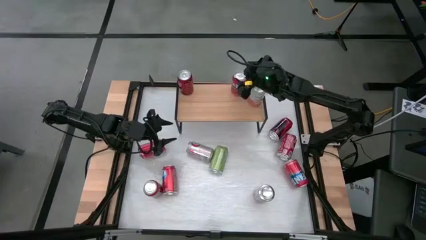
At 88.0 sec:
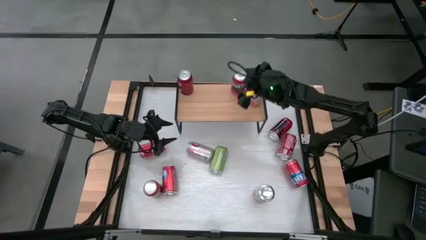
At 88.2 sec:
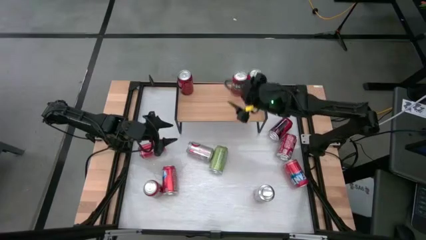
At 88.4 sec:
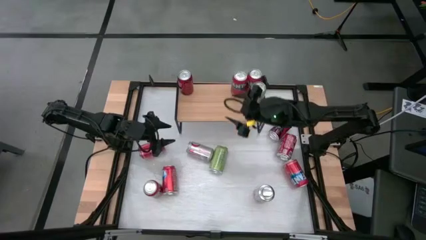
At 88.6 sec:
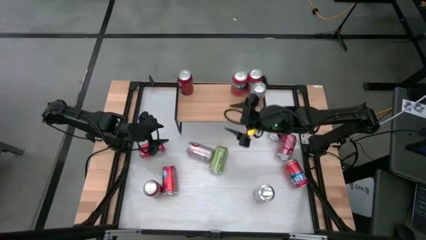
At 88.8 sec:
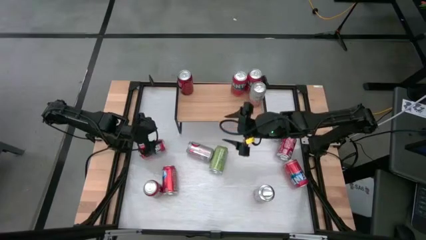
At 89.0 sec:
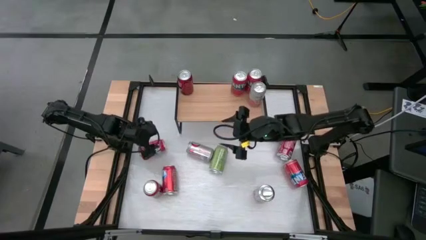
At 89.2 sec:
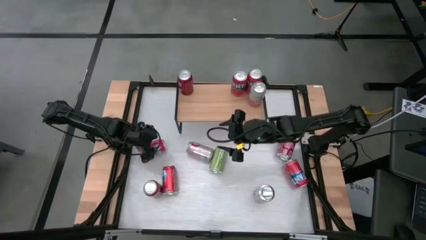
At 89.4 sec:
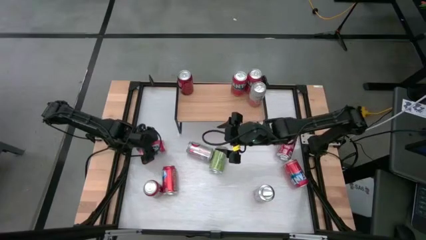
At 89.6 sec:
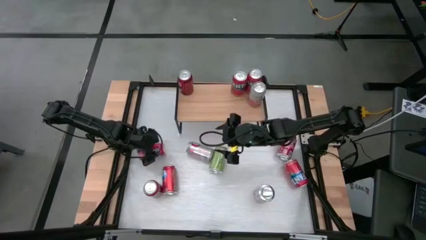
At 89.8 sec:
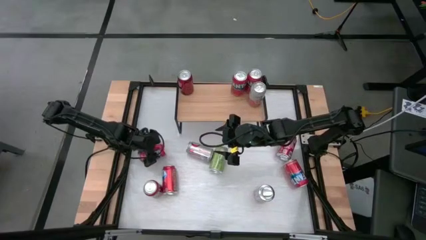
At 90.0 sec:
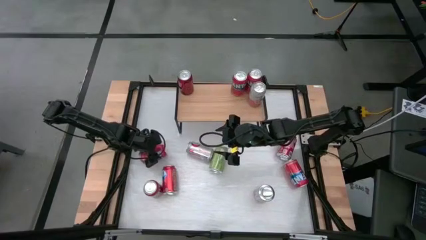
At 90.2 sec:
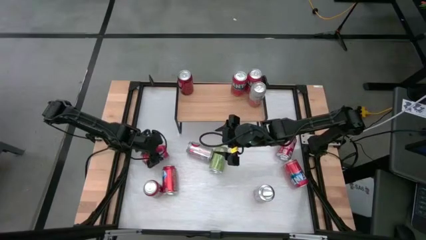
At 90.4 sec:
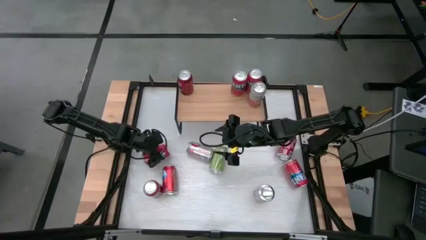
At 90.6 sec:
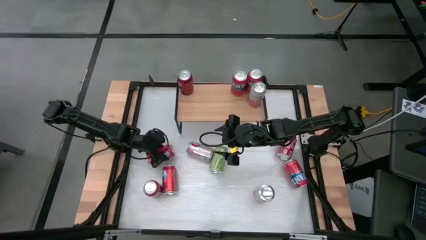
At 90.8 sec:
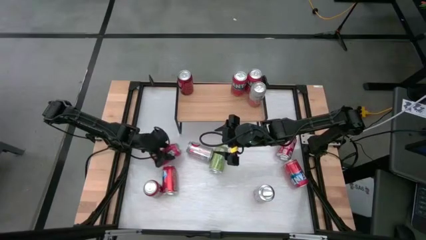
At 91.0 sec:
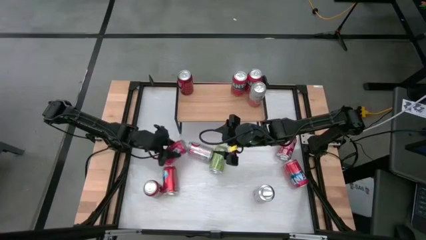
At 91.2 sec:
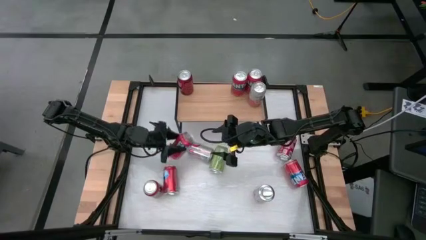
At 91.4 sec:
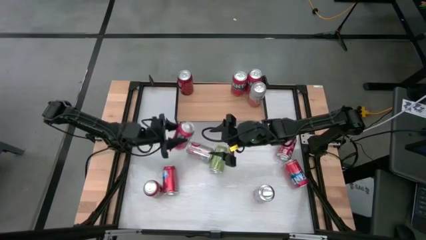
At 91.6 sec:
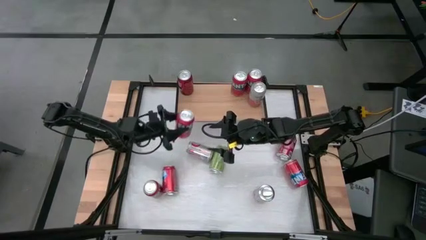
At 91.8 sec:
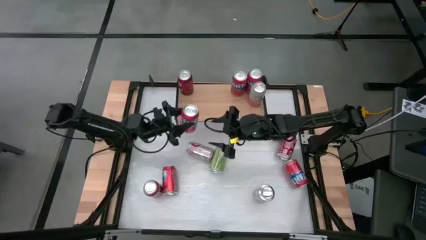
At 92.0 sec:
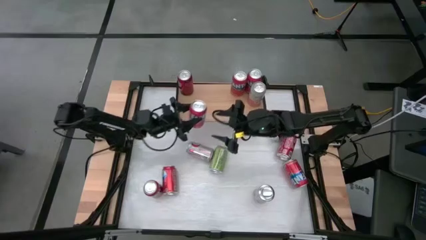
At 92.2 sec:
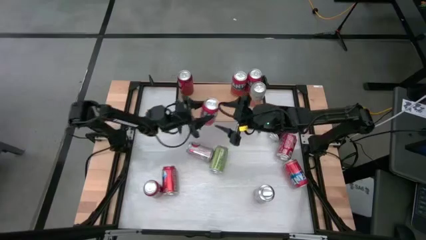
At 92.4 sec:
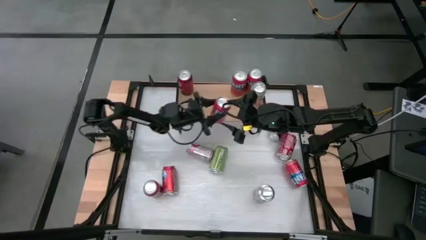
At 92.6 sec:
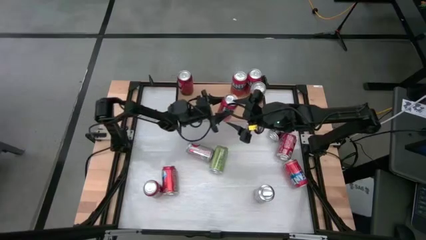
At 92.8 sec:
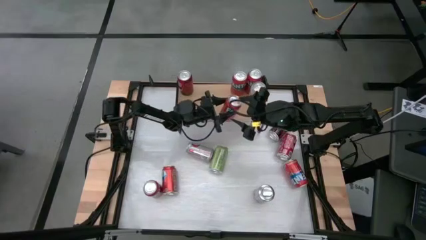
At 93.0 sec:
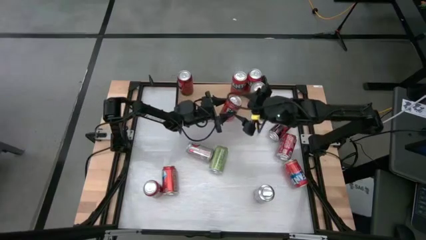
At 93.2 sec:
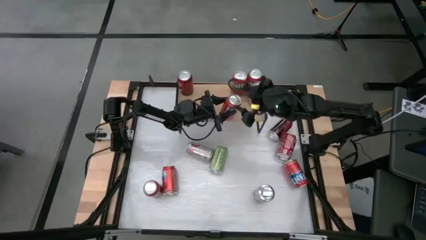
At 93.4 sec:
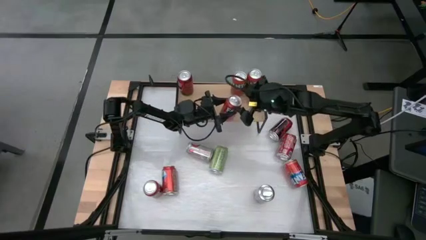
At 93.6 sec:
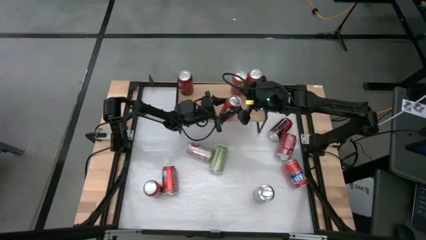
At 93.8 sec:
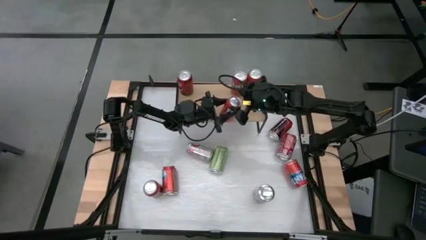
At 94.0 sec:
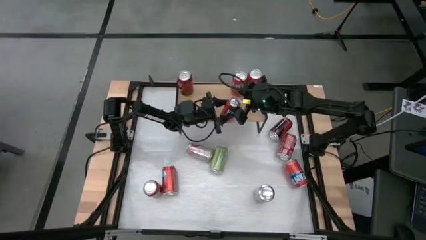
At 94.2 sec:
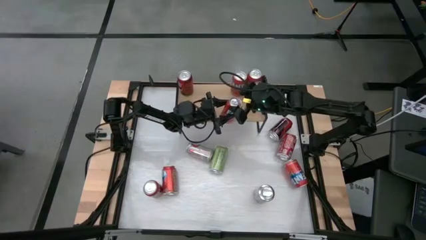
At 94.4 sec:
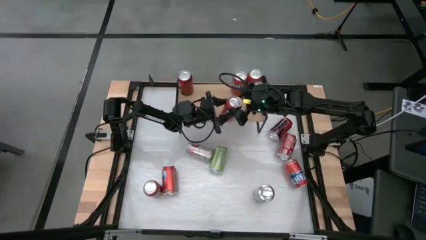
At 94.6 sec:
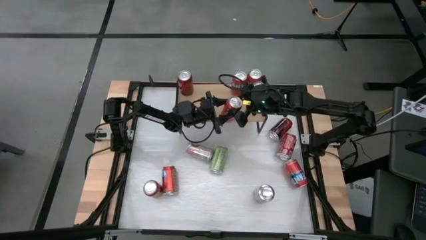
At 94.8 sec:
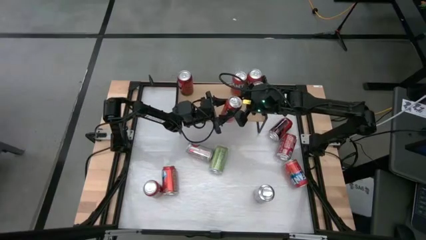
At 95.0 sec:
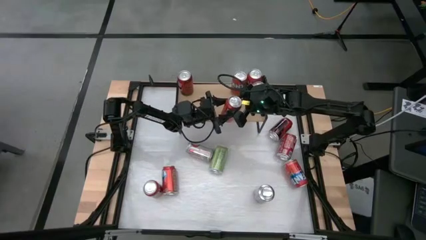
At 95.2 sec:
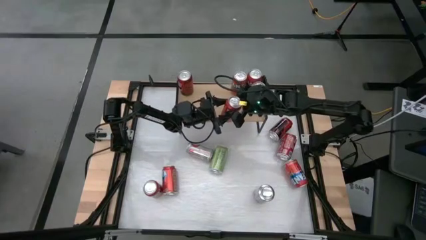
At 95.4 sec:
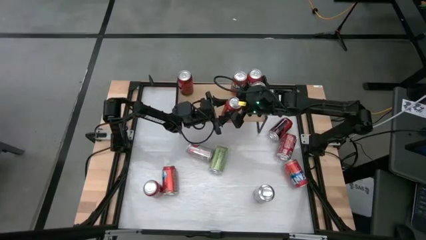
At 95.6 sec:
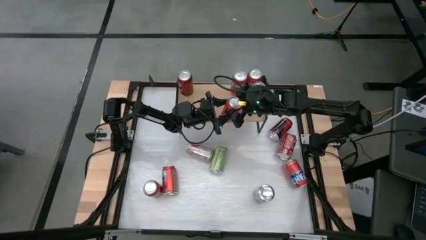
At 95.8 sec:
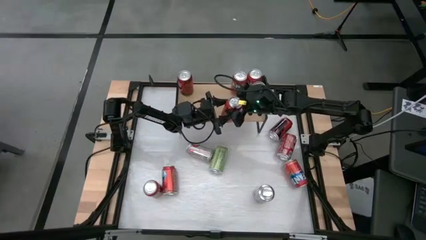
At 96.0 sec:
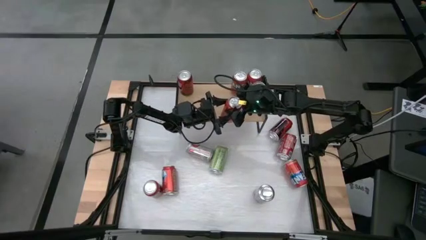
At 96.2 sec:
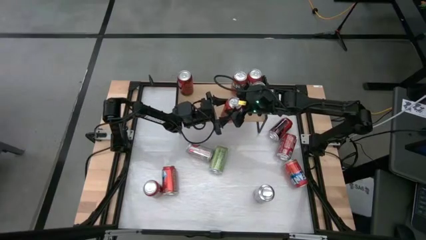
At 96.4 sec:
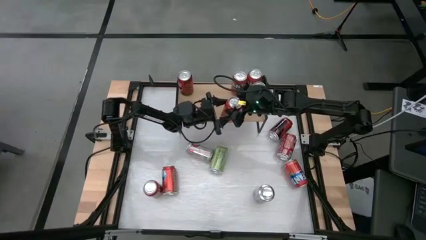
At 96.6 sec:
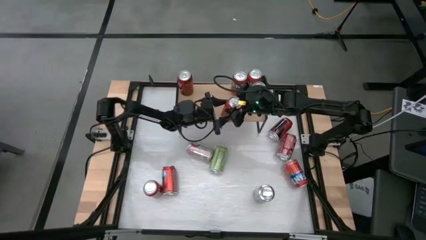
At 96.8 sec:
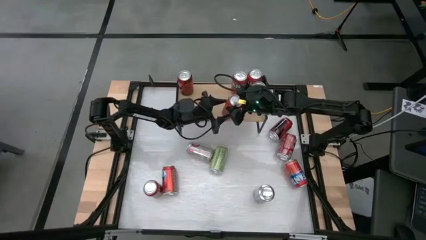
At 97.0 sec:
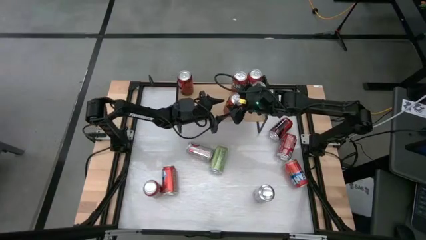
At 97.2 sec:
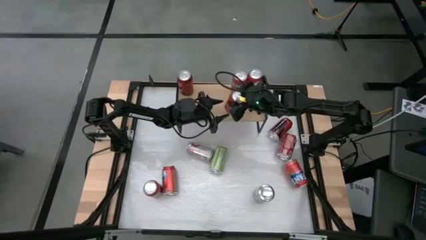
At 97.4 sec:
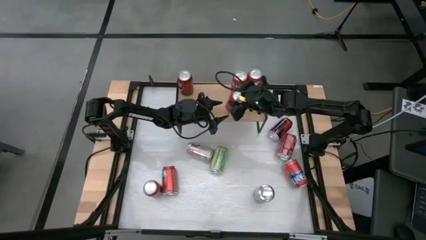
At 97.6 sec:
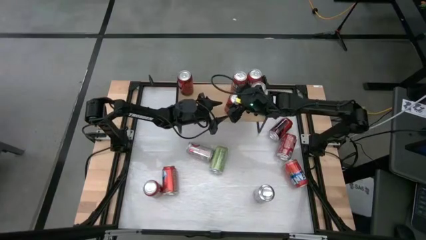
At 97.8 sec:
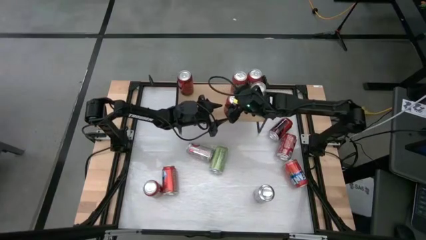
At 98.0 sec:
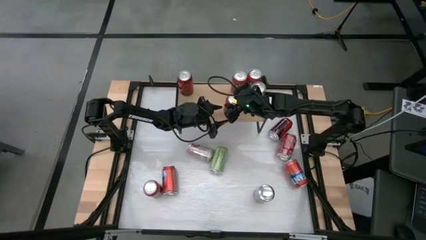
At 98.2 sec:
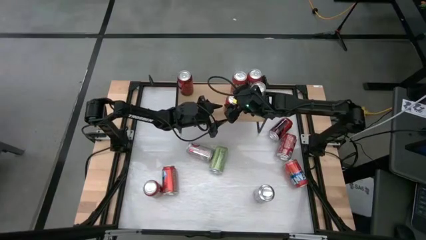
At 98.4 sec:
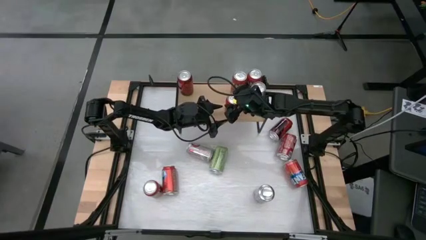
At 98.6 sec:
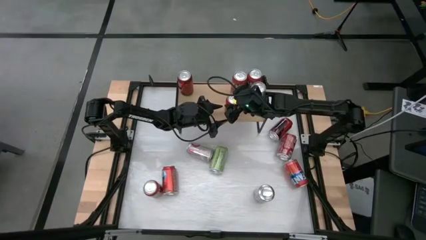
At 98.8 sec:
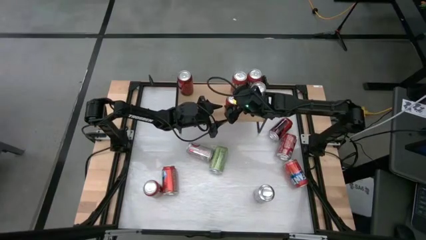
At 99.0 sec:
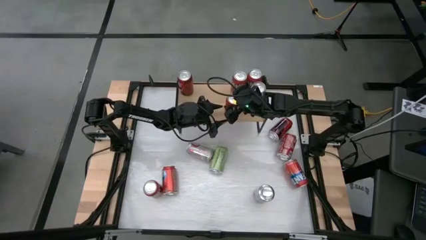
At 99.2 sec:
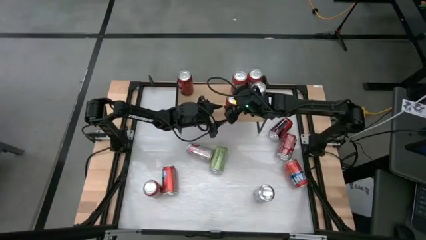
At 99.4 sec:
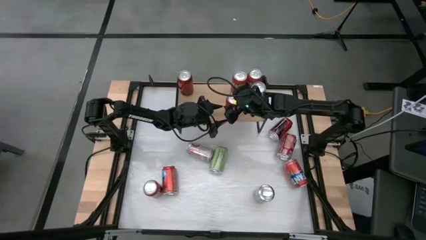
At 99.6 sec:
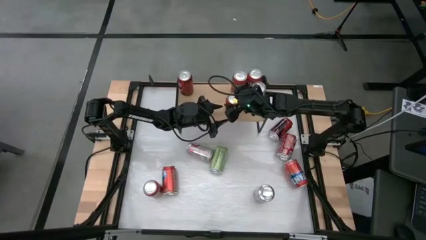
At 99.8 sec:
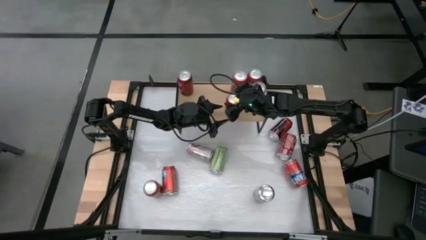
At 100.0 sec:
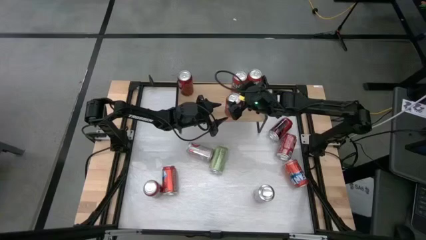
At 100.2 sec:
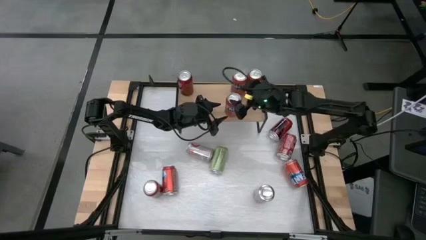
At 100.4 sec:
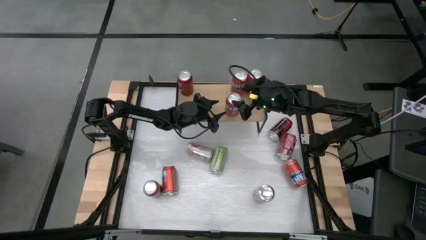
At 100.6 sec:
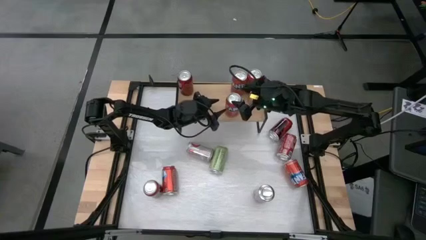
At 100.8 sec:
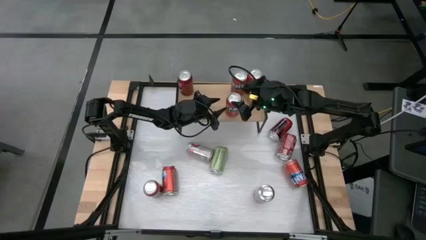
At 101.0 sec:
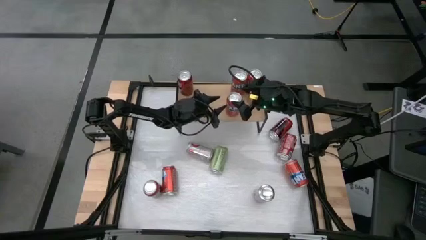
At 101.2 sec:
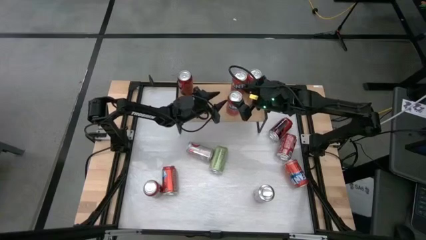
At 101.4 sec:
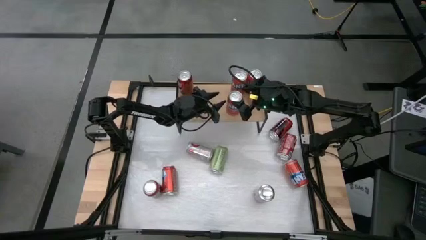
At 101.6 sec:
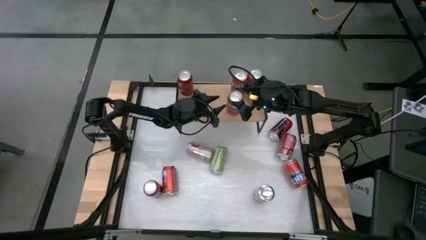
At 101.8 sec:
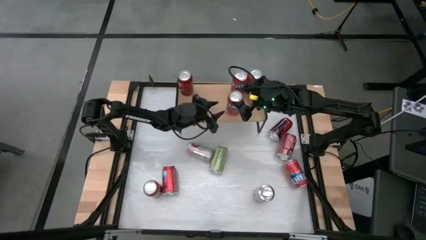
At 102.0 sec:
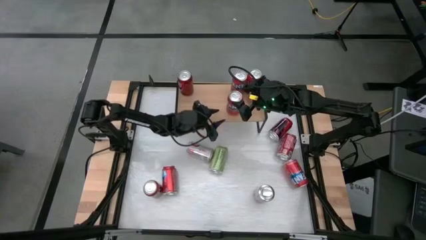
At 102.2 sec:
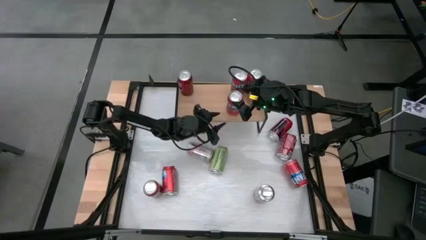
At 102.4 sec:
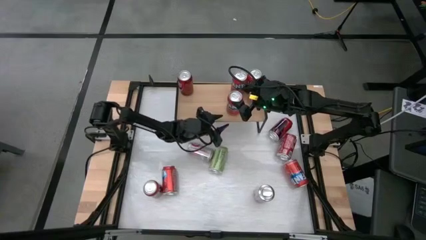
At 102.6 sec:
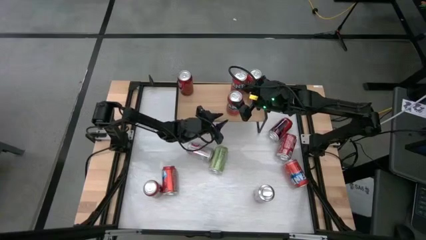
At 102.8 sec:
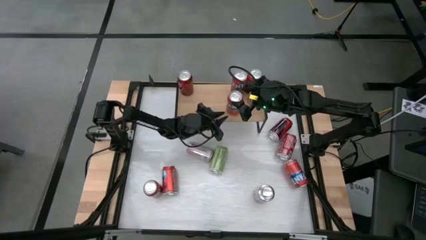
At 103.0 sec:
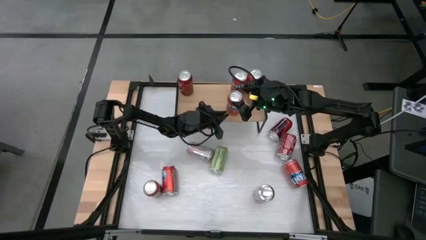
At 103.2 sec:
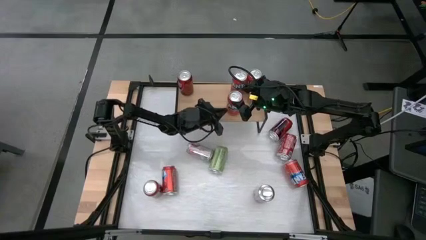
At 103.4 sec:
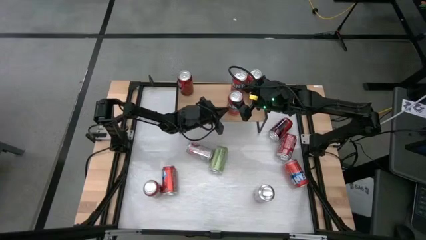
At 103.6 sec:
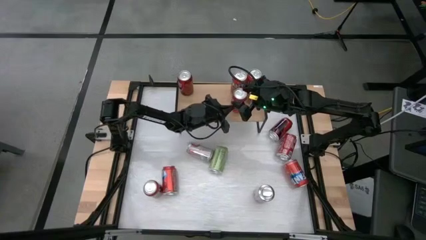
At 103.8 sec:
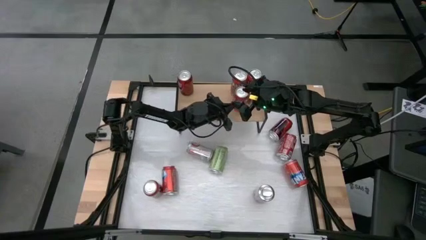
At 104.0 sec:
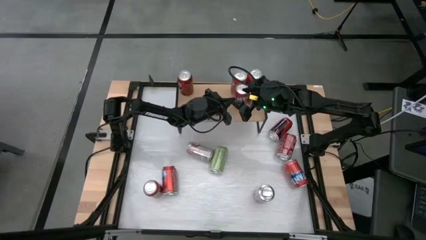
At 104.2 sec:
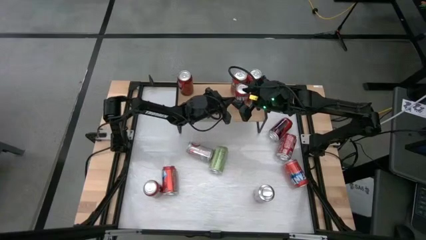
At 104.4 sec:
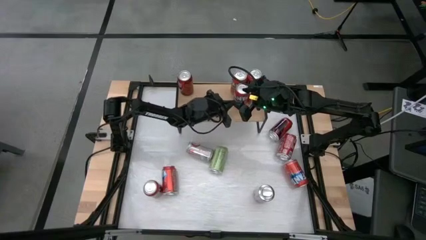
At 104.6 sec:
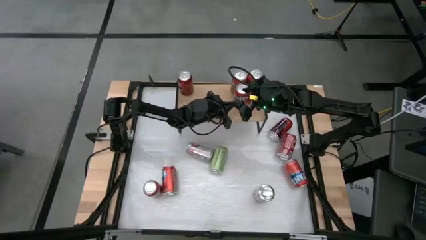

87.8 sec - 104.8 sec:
Task: Place canned beverage on shelf
Put the orange soda can on the shelf aligned with the other orange soda can
